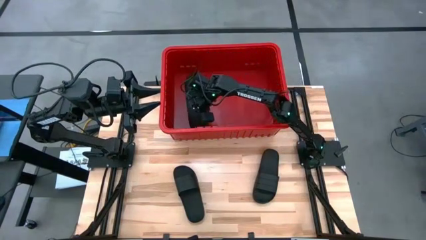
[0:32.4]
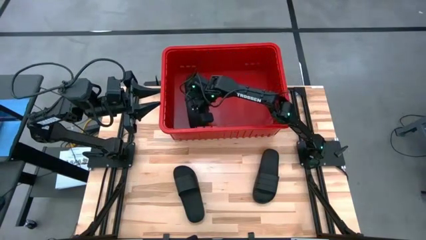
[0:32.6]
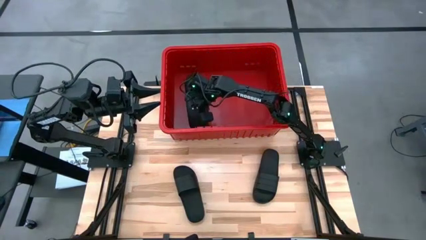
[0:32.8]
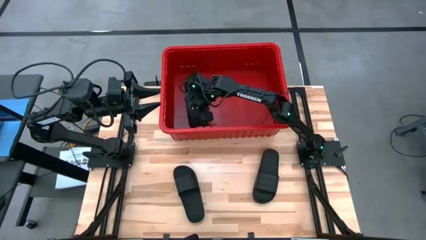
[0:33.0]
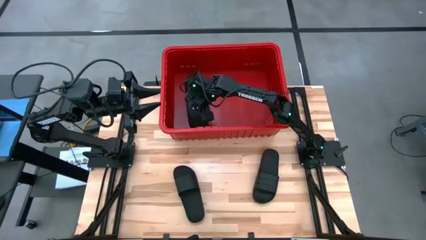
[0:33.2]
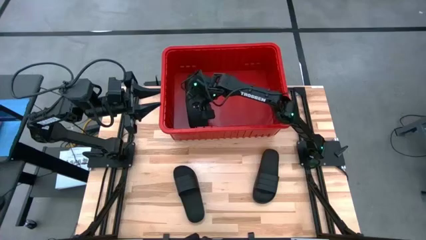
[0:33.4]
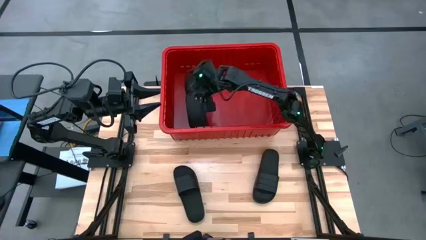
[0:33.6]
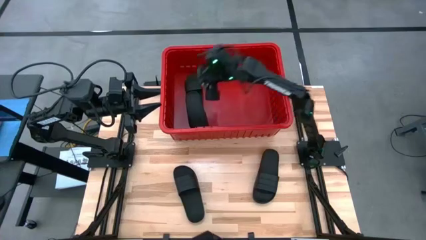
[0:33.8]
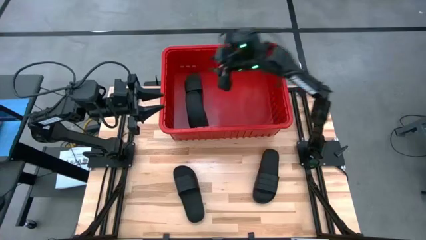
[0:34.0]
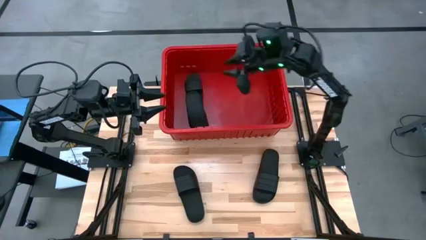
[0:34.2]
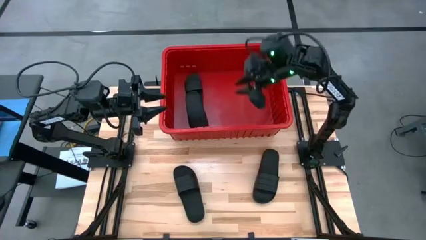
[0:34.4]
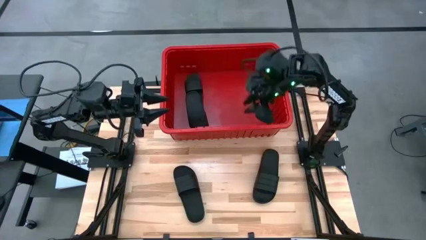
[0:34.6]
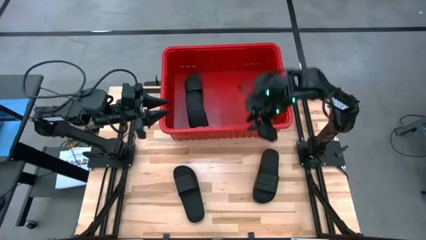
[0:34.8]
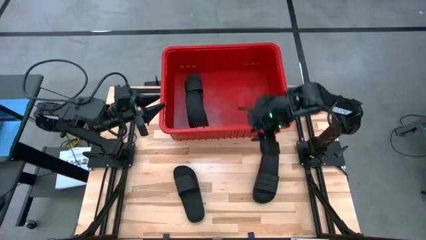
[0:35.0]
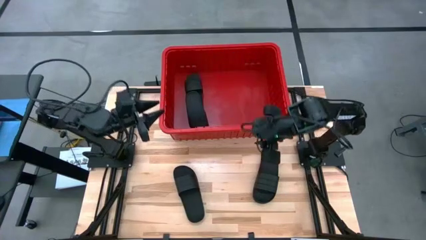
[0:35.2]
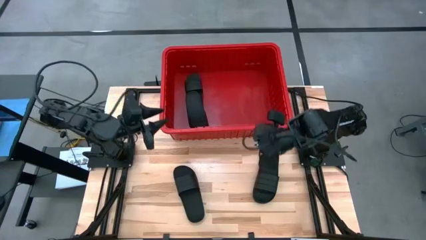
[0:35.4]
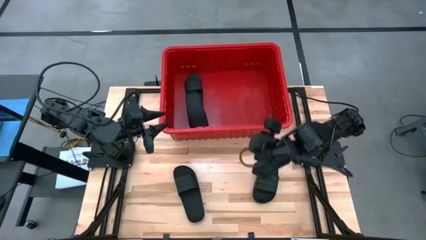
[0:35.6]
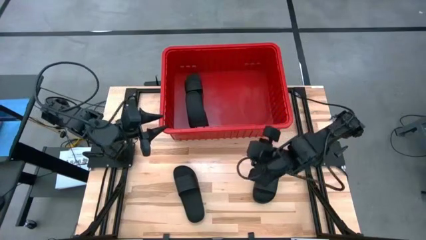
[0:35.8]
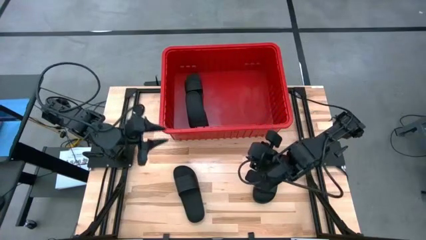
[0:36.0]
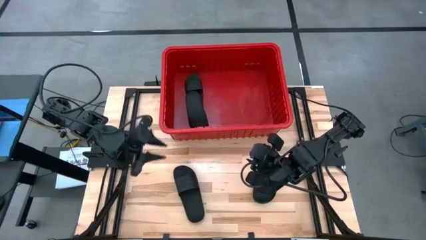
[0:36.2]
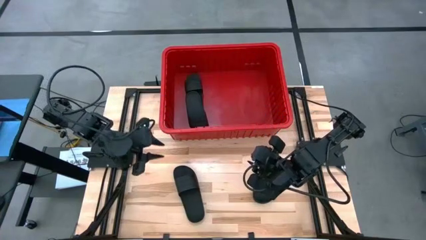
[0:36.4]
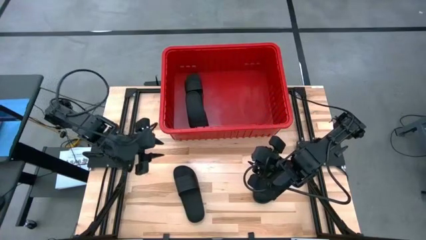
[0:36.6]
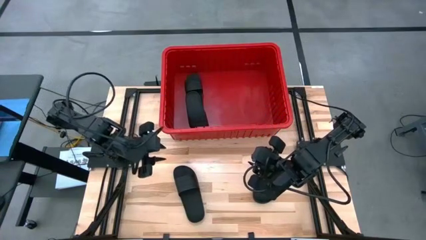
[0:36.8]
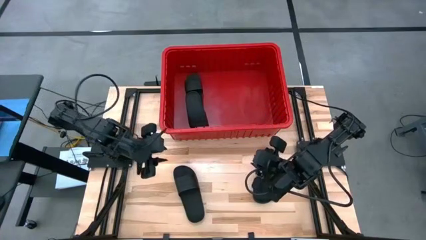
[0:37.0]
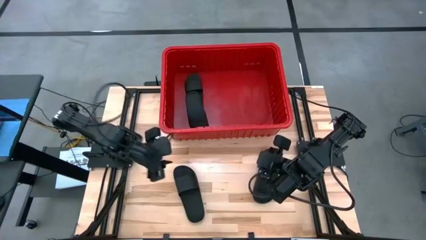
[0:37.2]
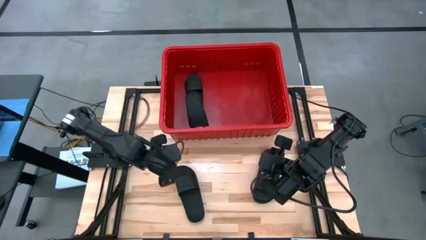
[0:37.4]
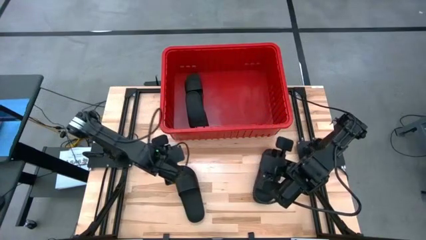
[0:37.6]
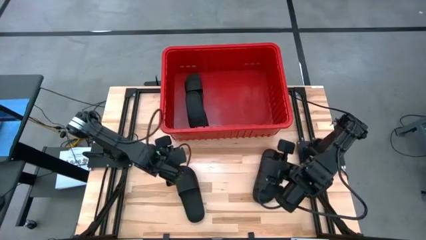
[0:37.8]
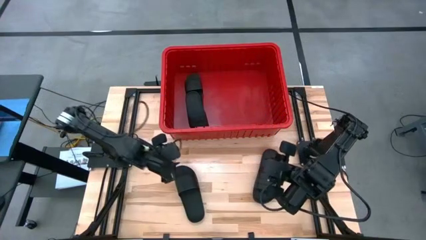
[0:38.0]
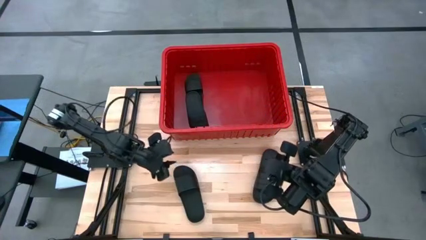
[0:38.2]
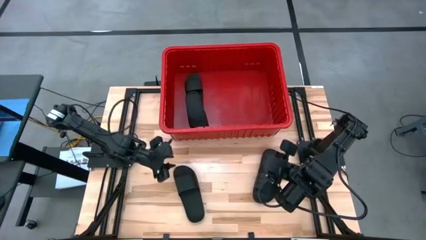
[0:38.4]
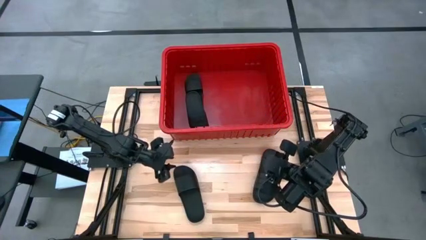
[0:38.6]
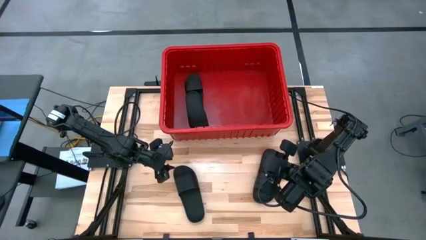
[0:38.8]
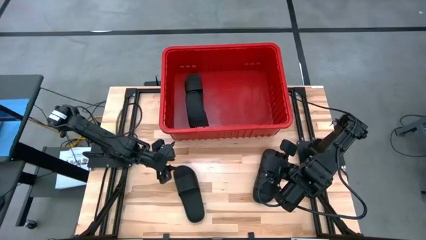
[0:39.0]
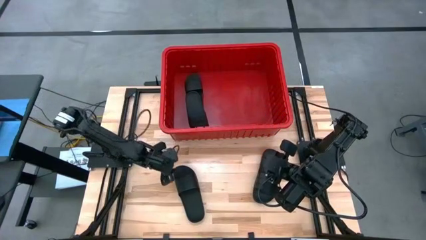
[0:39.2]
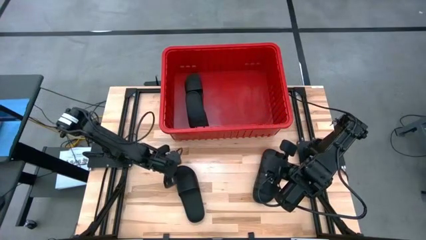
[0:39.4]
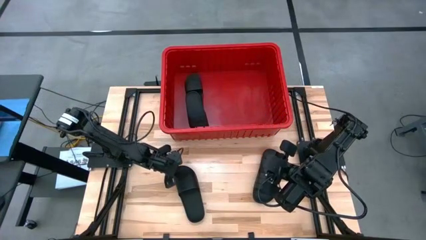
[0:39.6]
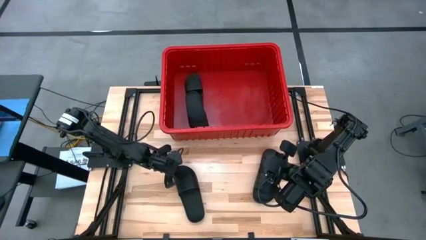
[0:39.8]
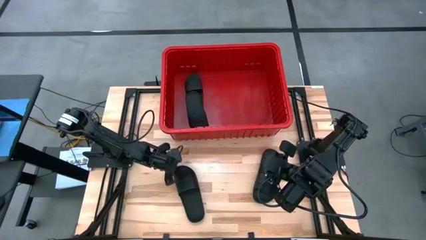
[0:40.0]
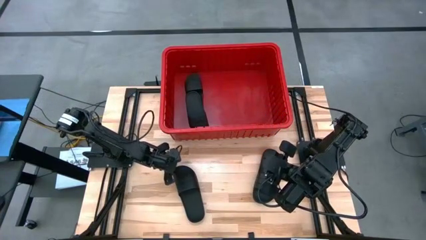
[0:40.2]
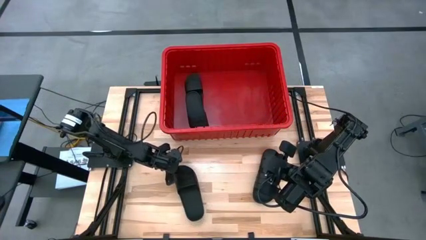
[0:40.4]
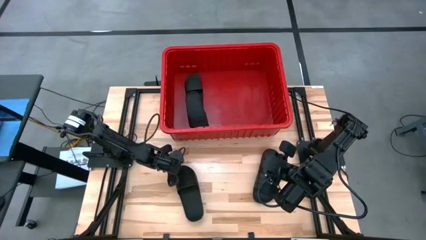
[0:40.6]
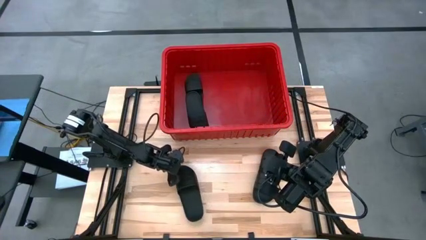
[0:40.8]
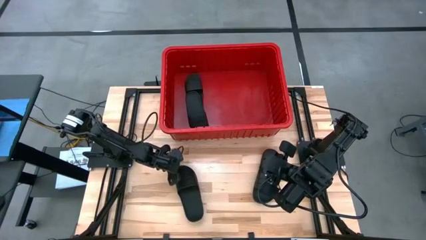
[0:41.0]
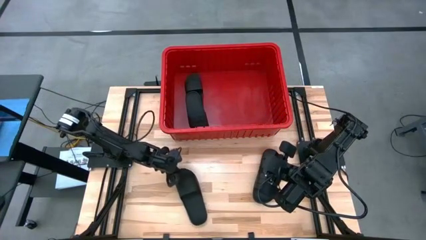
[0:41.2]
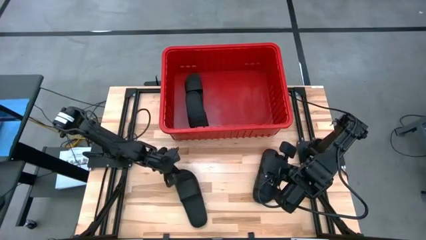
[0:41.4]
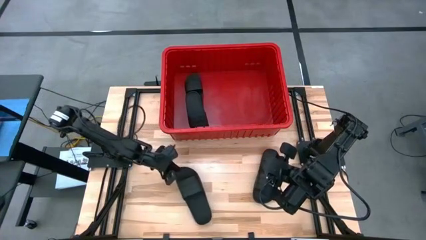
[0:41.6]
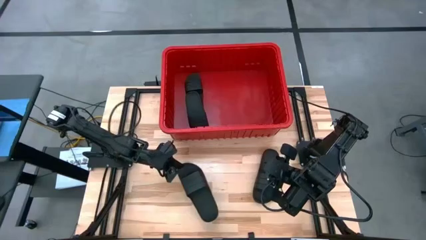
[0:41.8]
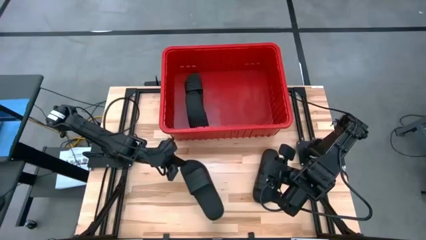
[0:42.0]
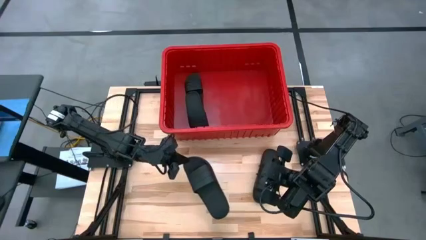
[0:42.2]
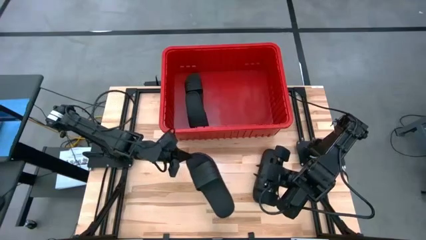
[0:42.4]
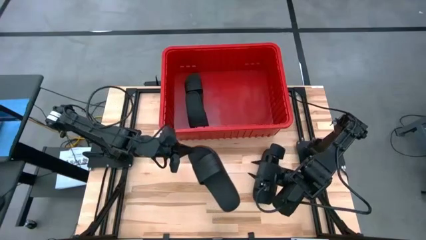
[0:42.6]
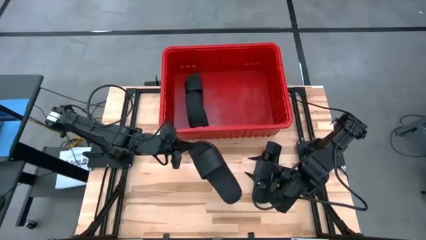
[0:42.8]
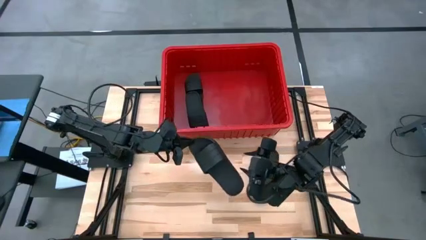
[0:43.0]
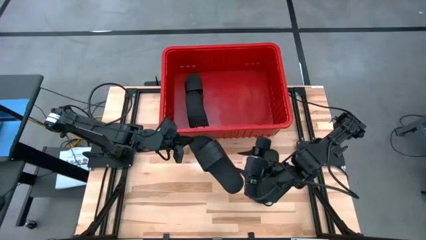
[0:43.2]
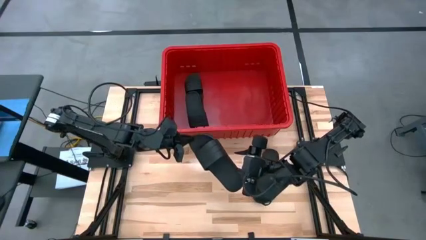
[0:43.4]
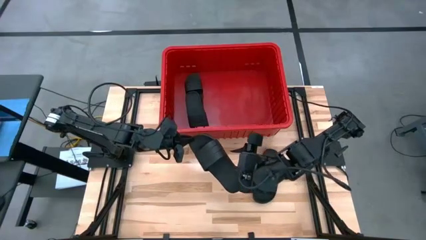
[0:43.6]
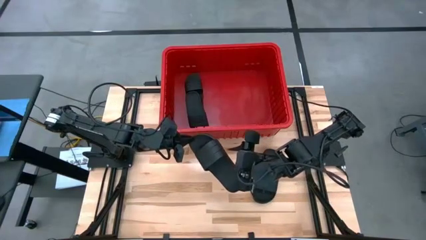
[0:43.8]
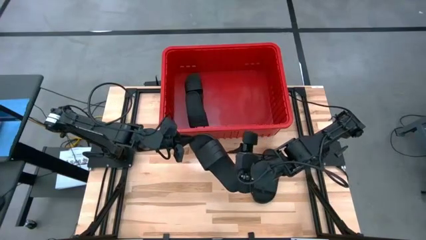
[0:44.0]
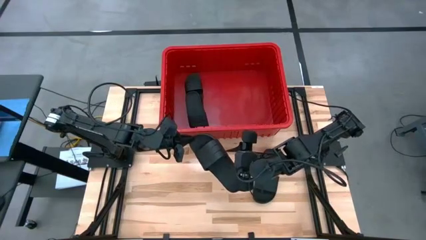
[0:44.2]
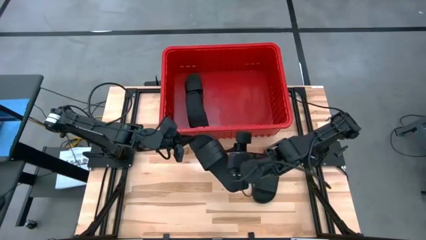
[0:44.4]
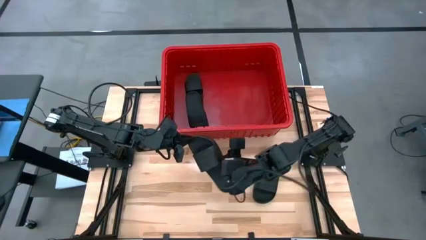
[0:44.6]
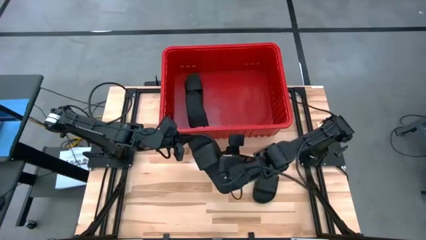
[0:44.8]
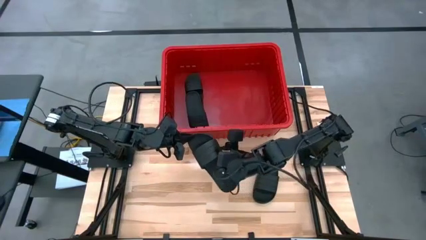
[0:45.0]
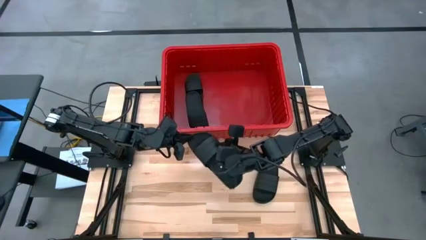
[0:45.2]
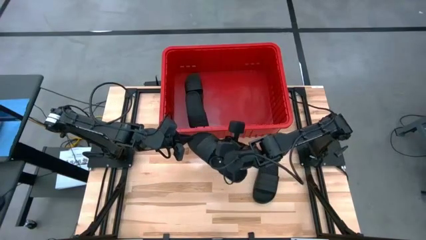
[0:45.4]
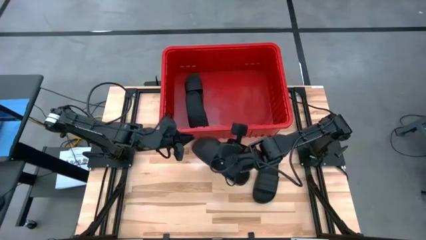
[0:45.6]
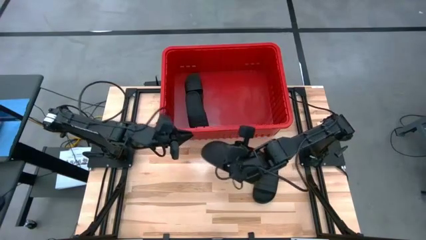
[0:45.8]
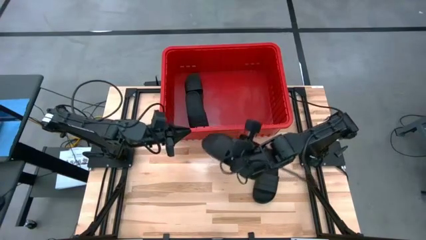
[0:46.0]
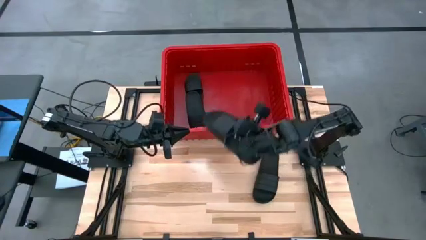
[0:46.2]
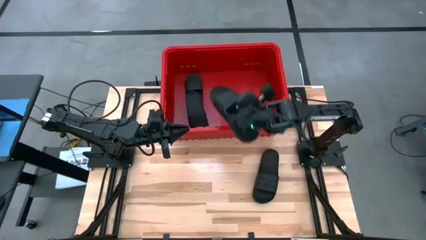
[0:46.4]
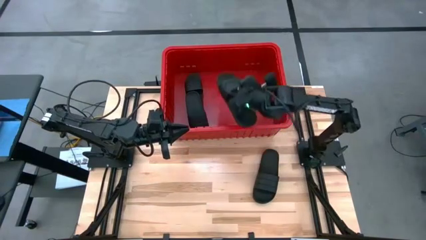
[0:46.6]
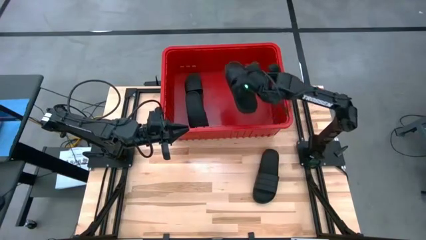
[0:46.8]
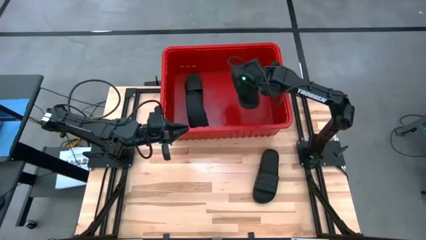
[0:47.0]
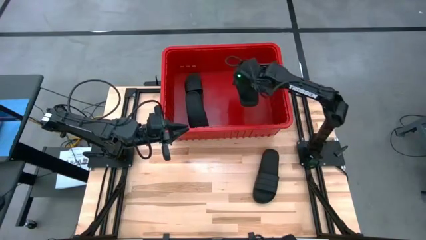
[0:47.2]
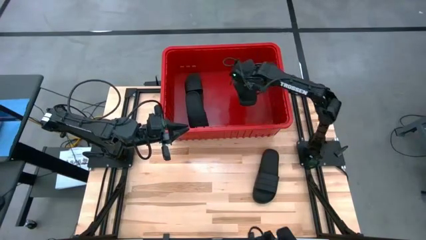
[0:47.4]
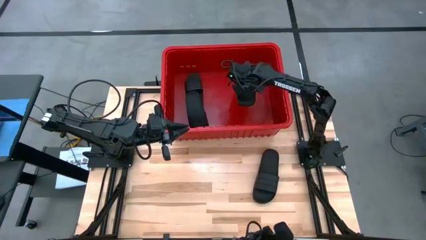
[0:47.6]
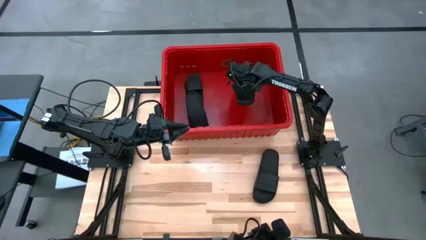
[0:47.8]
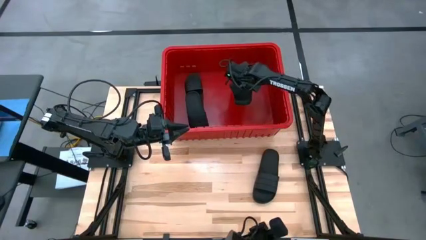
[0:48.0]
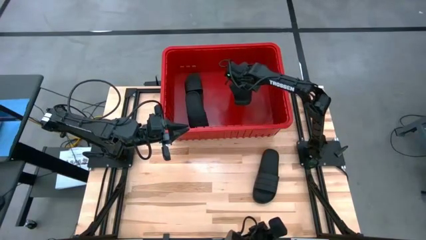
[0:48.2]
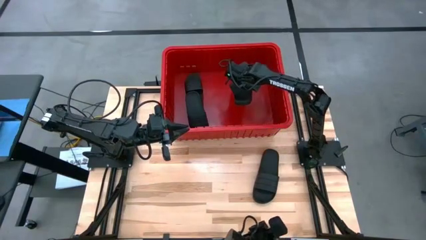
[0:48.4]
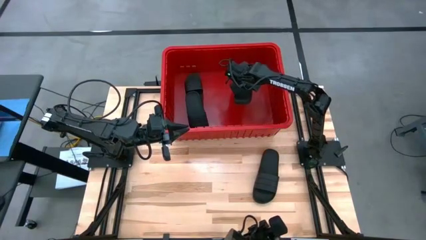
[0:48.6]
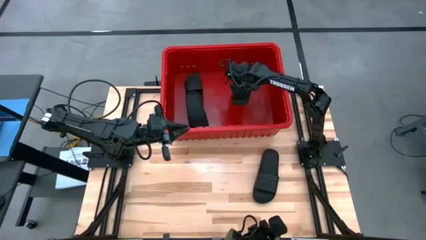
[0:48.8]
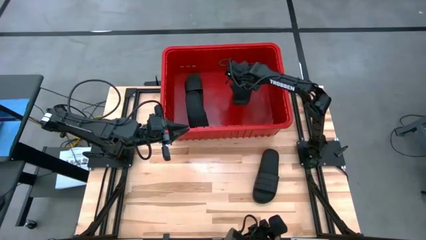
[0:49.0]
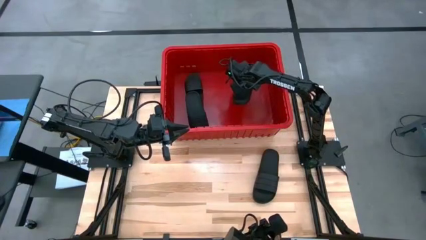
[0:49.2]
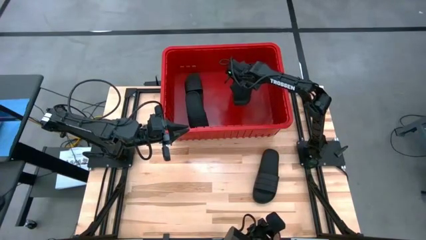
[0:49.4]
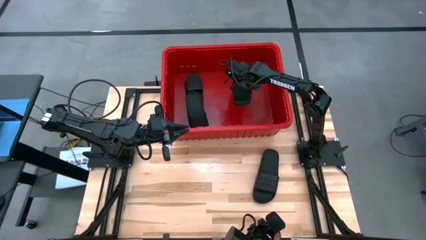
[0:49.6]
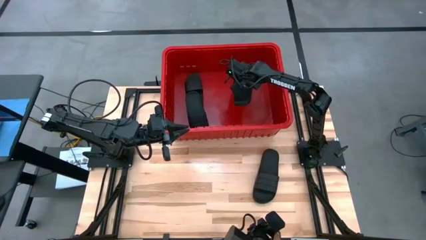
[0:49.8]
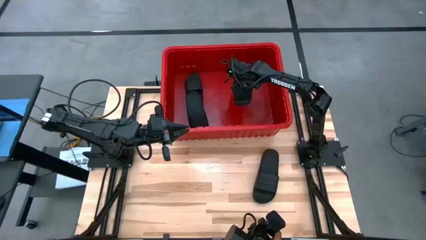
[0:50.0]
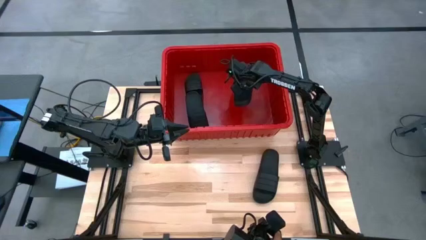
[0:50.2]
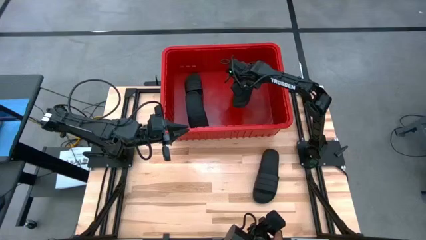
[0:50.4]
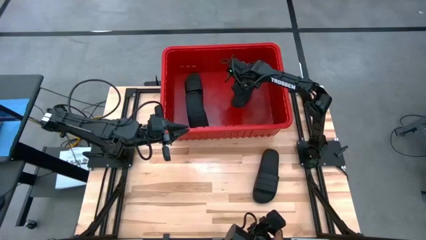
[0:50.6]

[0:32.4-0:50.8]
Task: Pick and place slides into bin
Put the black slides into the red bin
